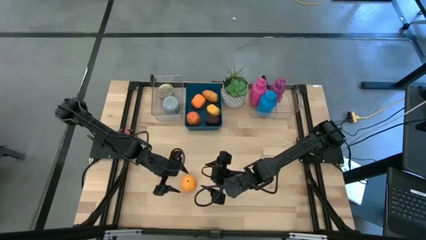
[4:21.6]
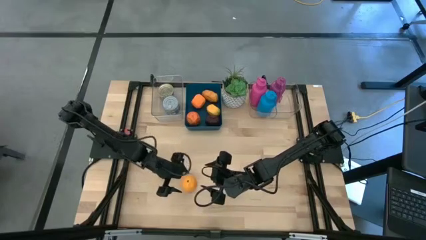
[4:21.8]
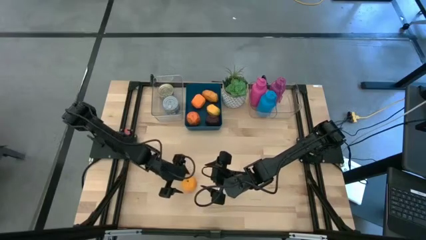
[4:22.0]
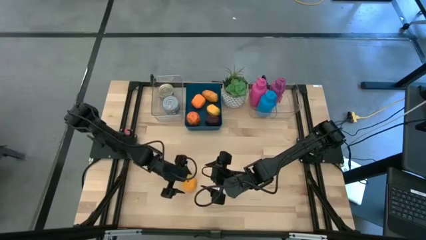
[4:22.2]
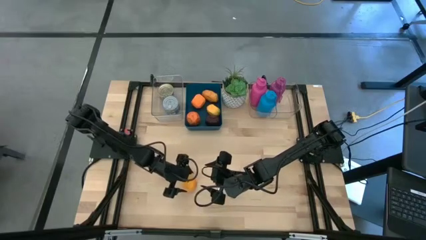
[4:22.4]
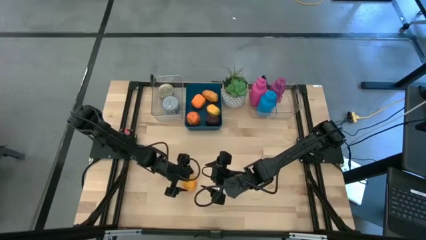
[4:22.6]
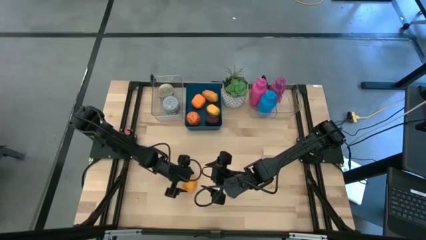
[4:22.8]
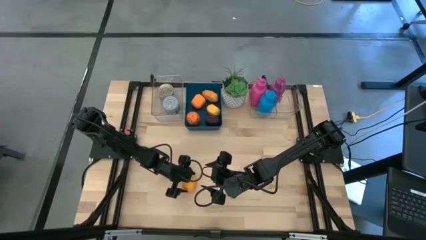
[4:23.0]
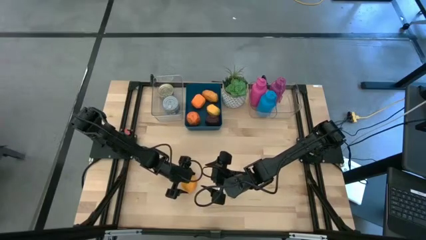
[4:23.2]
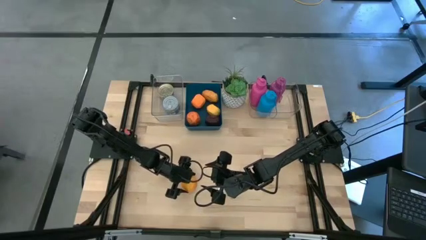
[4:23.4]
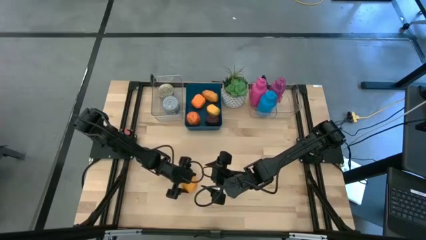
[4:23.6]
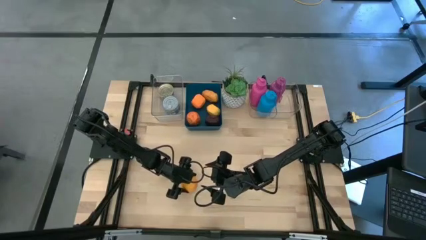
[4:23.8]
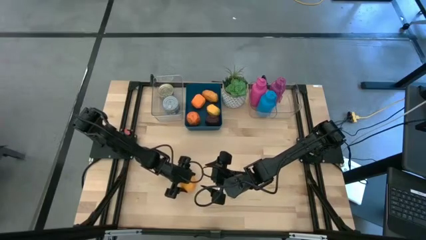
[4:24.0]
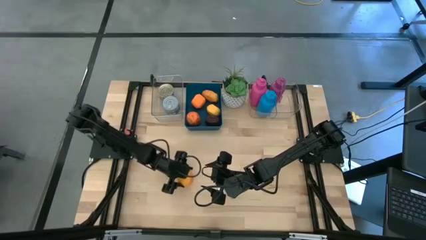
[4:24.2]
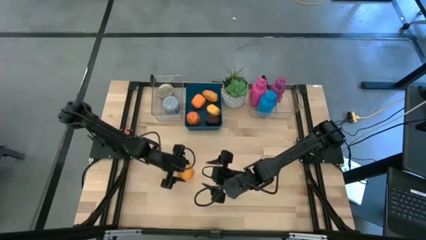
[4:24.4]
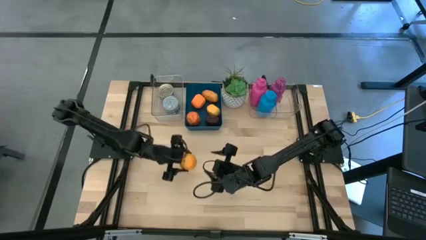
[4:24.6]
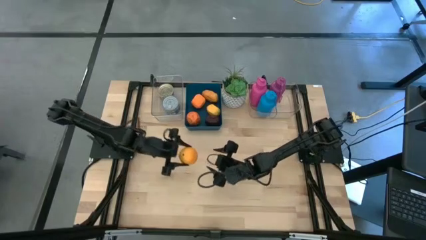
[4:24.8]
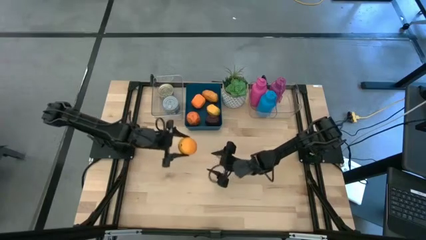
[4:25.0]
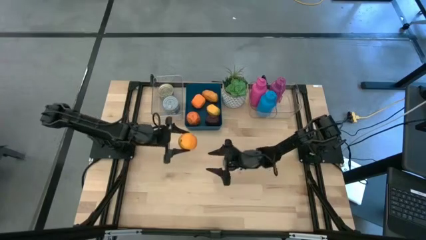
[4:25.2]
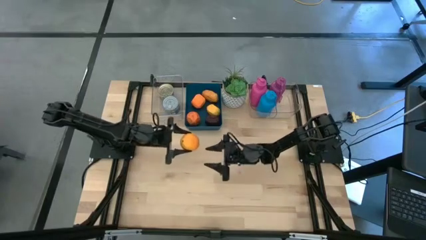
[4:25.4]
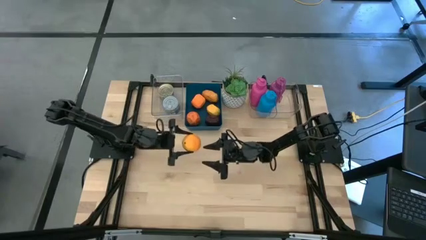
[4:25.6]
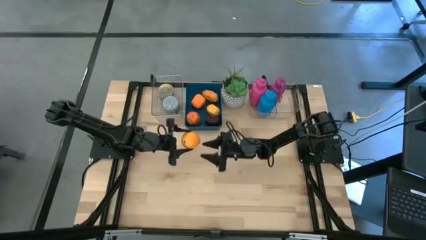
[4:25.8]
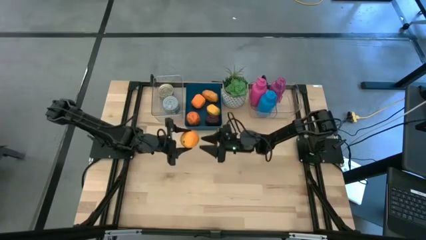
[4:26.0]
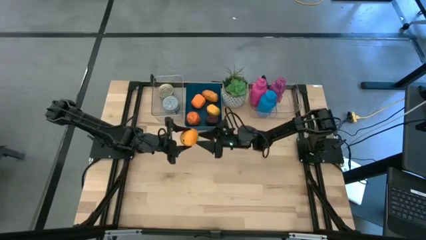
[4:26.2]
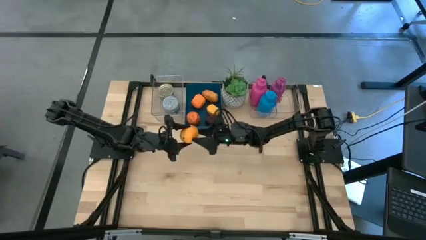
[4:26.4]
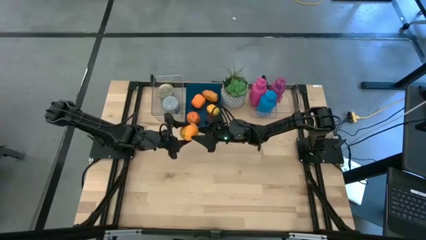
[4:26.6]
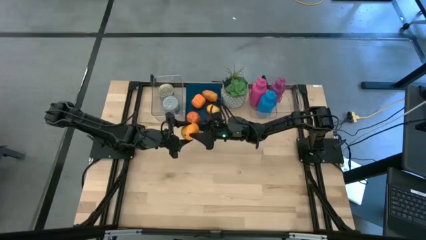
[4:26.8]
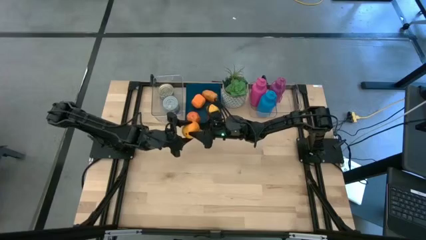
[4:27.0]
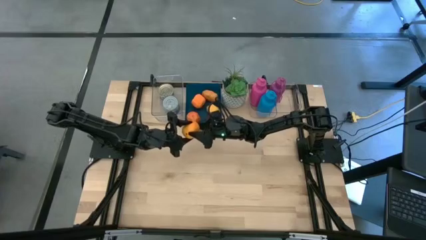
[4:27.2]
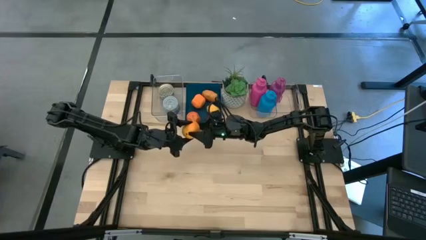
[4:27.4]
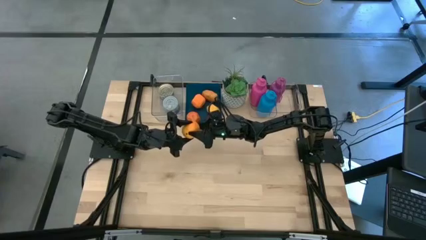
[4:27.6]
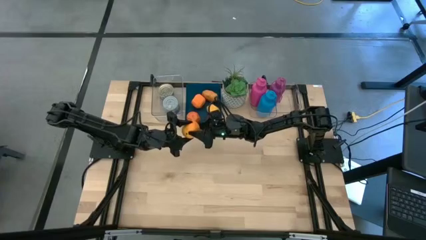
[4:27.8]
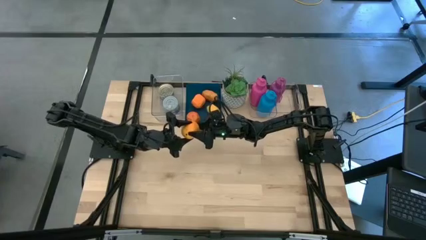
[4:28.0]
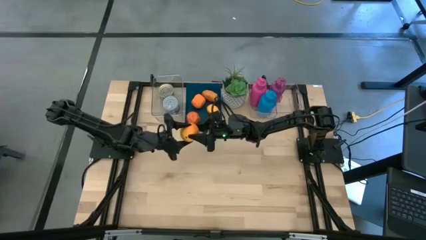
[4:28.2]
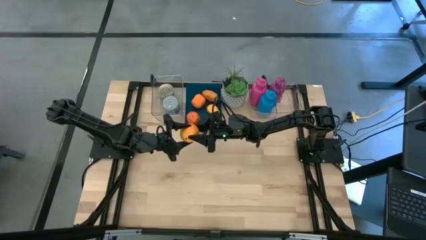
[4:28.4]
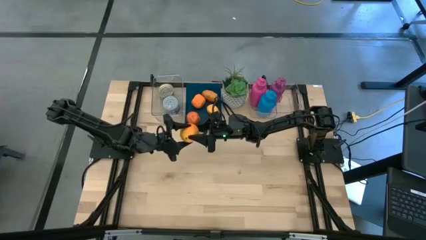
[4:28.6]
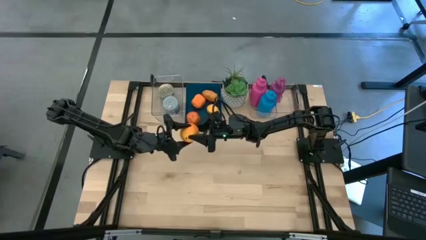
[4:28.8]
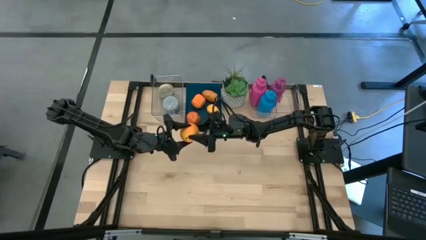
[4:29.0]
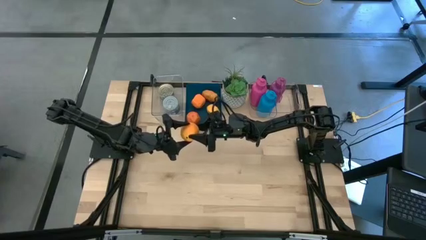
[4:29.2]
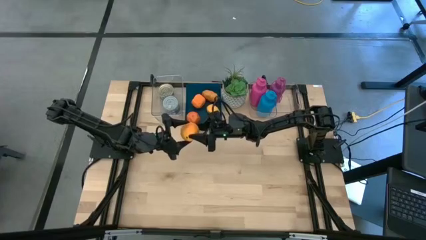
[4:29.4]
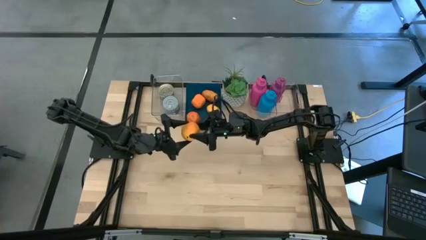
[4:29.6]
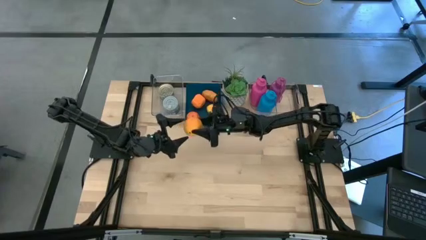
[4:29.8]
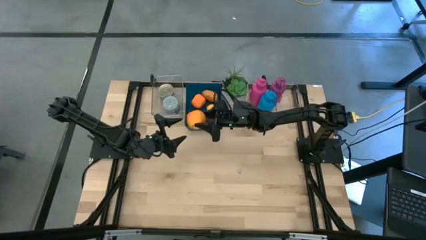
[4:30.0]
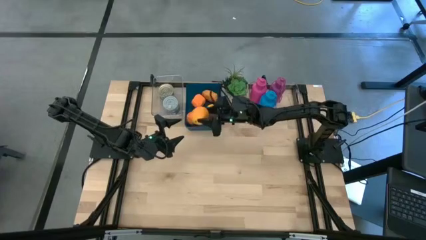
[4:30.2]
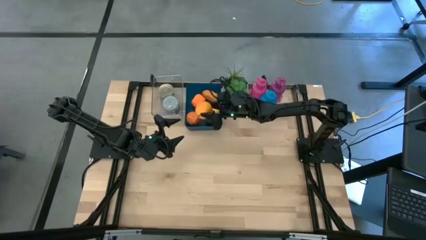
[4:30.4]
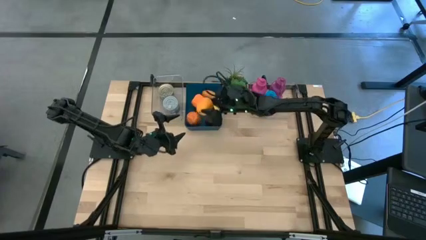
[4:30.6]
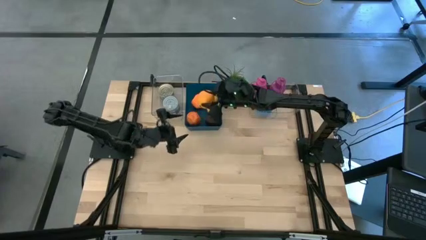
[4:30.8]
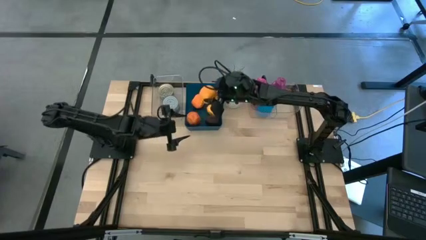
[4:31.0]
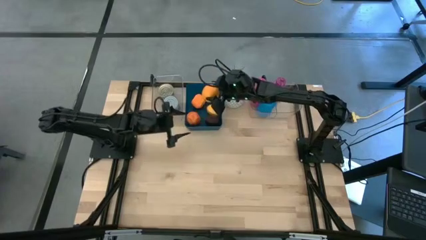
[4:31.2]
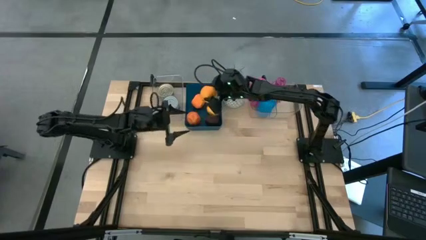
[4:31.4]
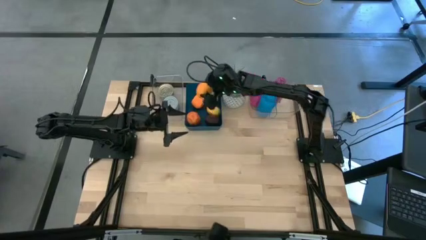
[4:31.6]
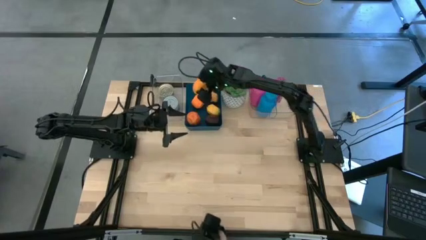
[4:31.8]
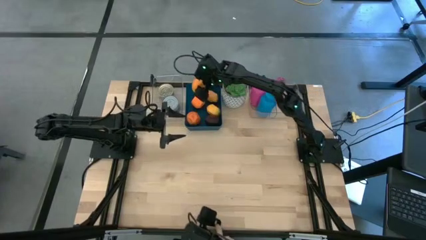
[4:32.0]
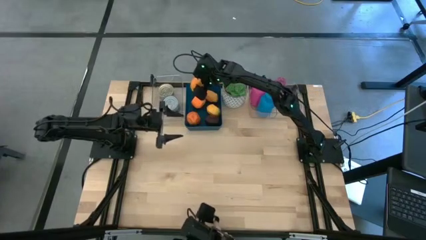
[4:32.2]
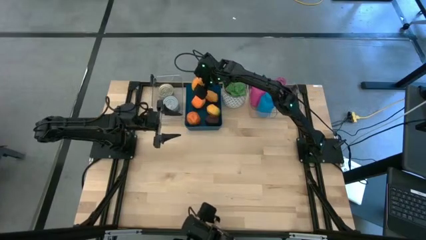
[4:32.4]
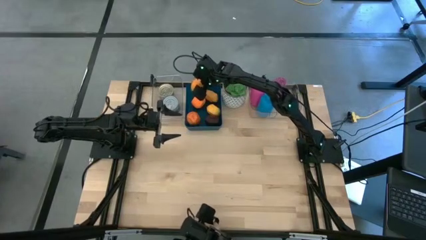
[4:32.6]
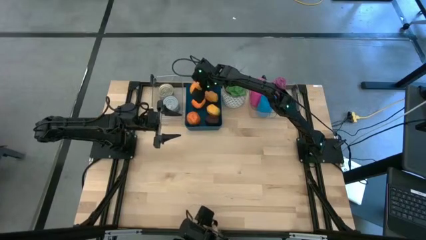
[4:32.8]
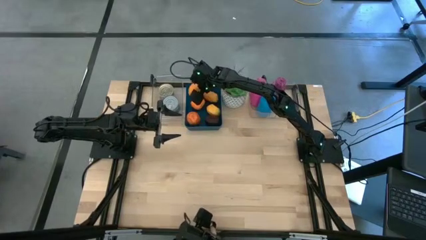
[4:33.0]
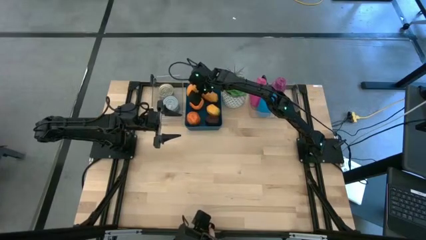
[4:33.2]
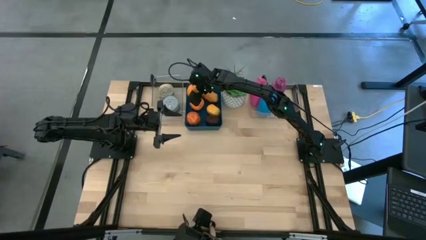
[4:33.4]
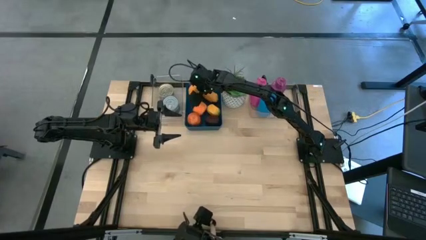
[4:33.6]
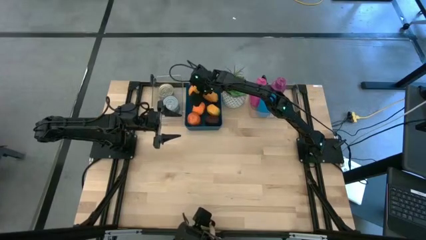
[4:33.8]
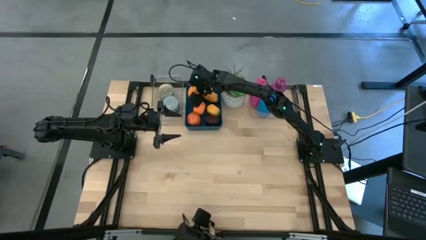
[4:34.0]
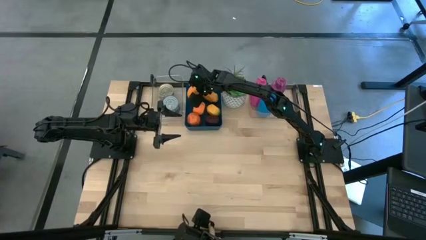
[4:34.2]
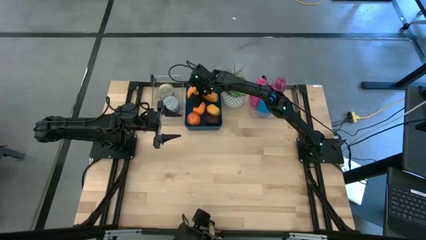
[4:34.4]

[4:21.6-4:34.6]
Task: Pick & Place Food Item
Put the orange into the blue bin

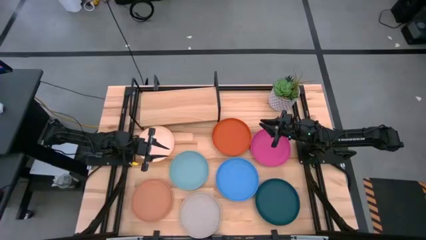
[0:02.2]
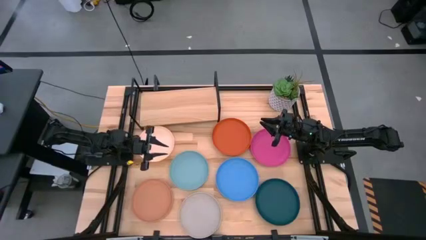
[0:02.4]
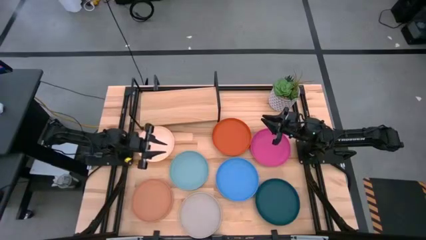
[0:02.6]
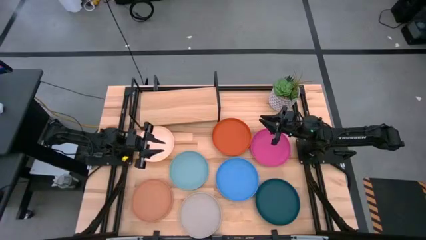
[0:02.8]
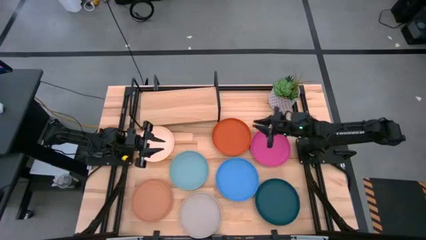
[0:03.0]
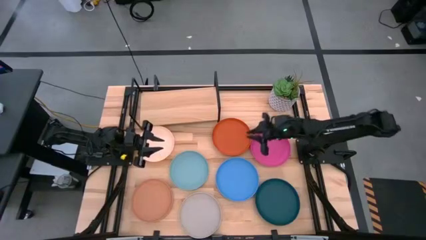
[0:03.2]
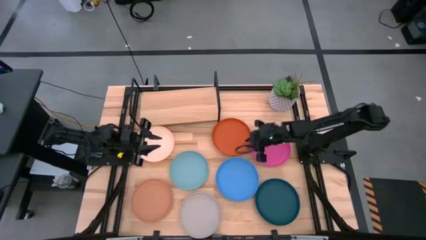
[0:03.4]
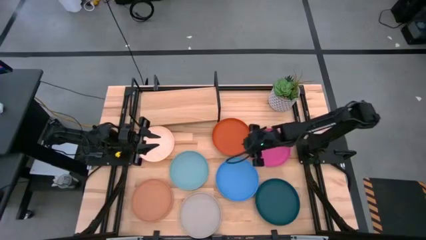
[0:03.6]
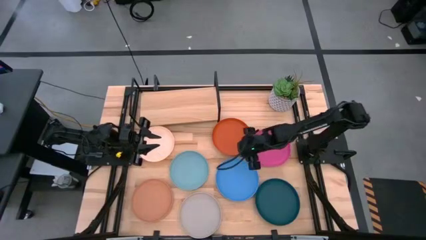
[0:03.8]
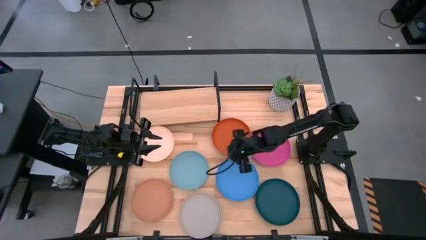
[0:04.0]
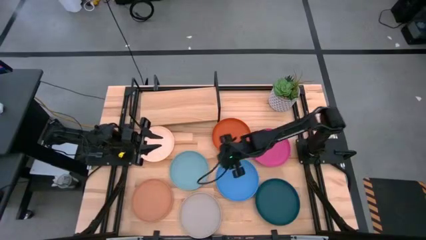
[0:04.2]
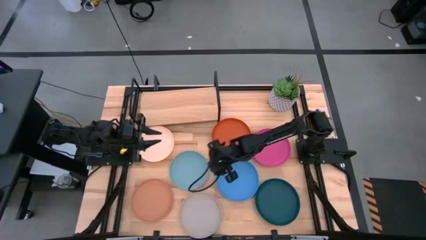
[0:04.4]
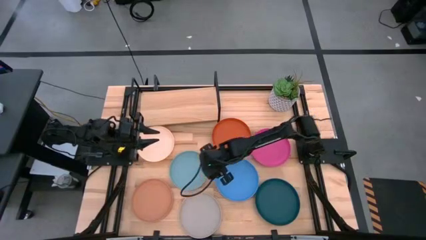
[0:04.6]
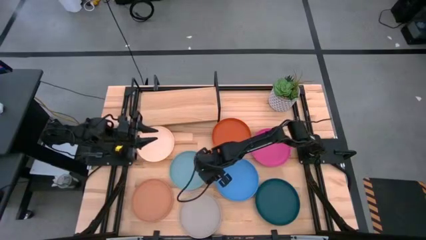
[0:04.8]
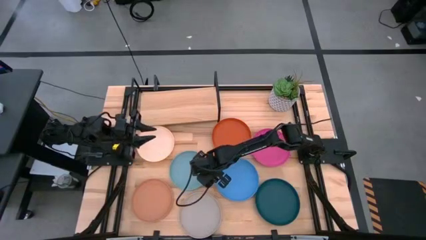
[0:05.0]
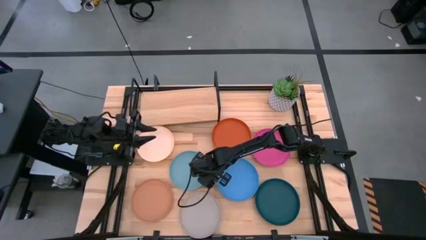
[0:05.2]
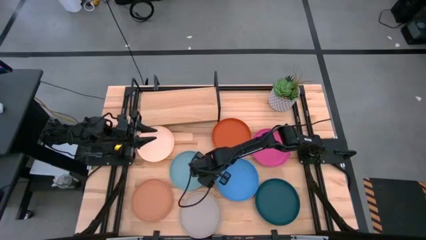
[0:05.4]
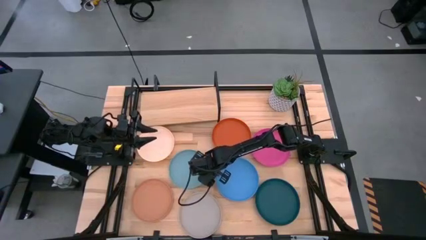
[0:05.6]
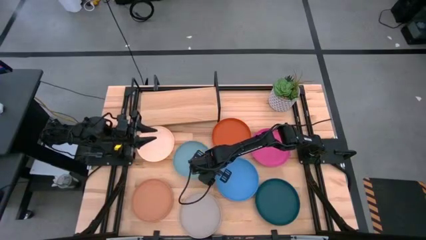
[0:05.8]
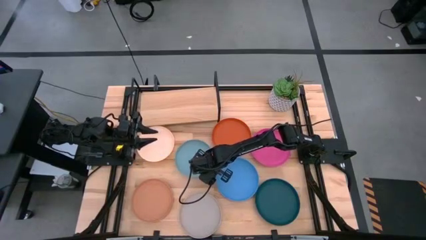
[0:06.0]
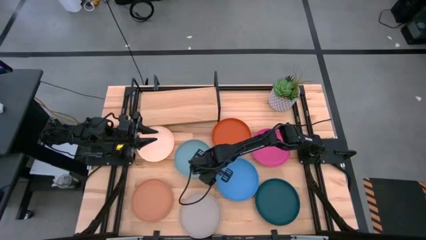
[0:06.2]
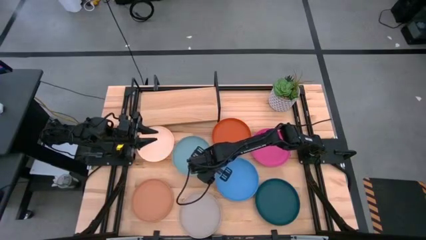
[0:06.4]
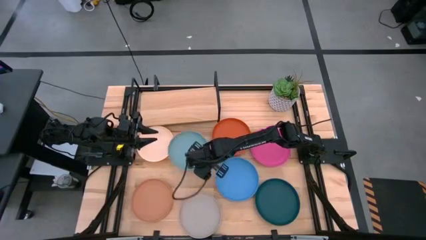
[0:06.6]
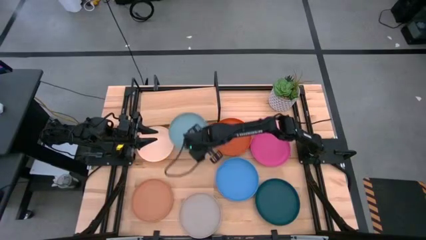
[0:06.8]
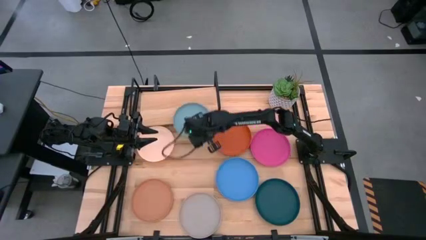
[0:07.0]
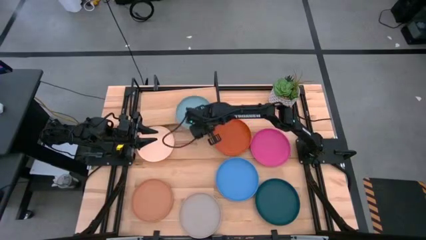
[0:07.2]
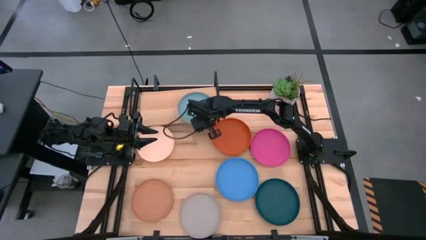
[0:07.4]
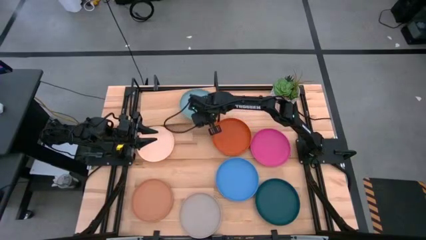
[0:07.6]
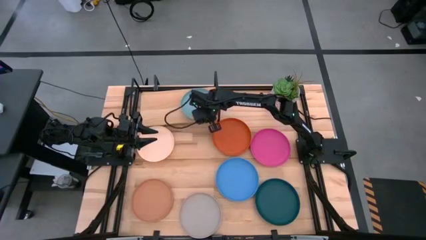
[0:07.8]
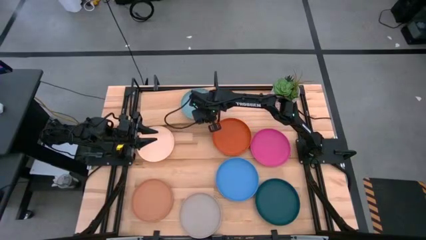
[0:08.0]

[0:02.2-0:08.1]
Task: Place and stack plates onto a shelf
Put the light blue plate on the shelf
